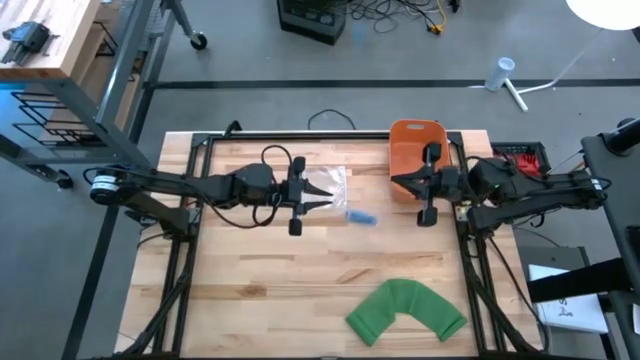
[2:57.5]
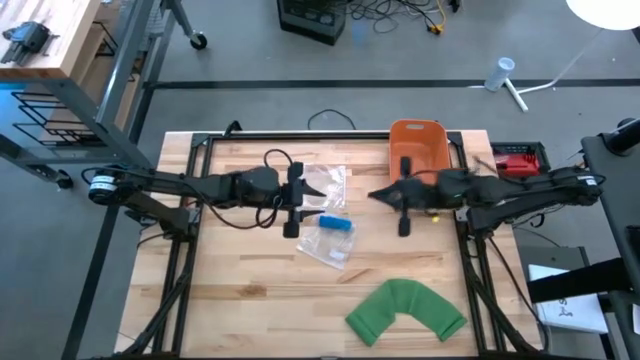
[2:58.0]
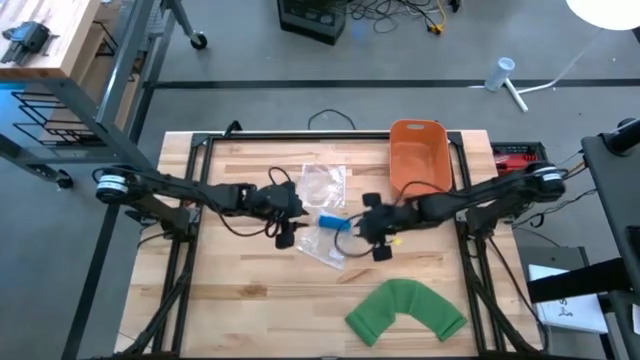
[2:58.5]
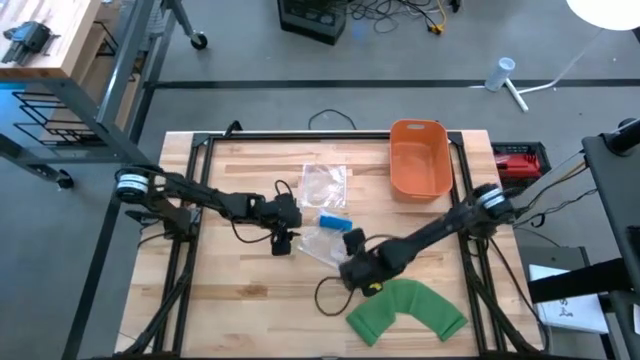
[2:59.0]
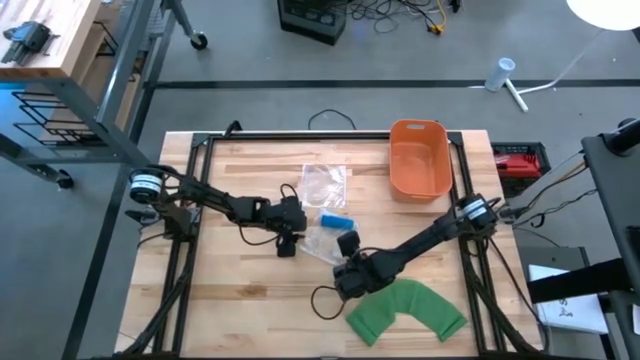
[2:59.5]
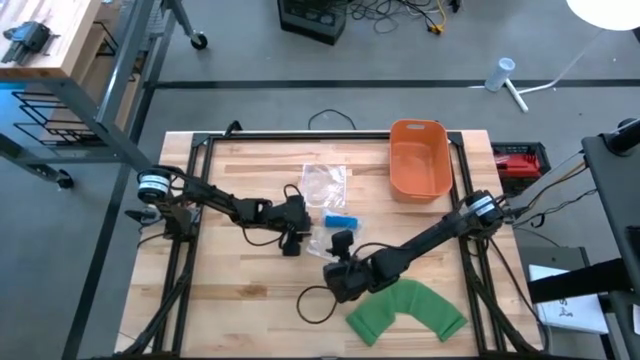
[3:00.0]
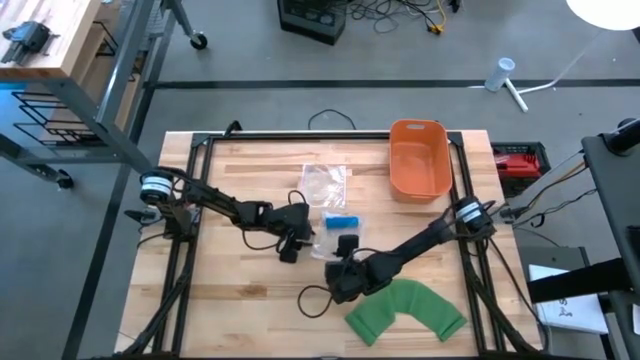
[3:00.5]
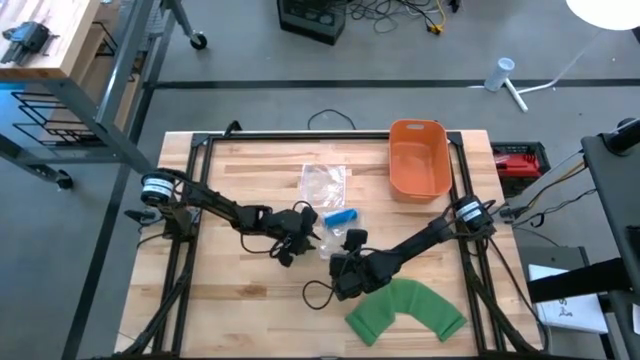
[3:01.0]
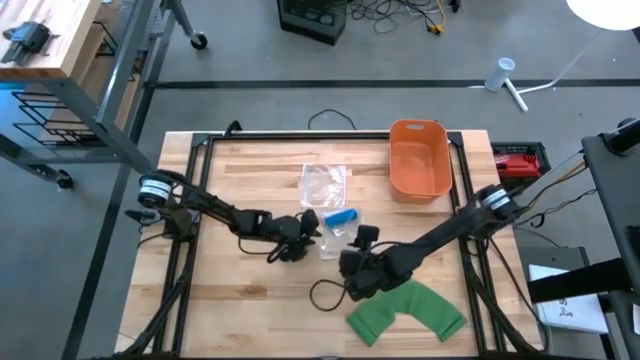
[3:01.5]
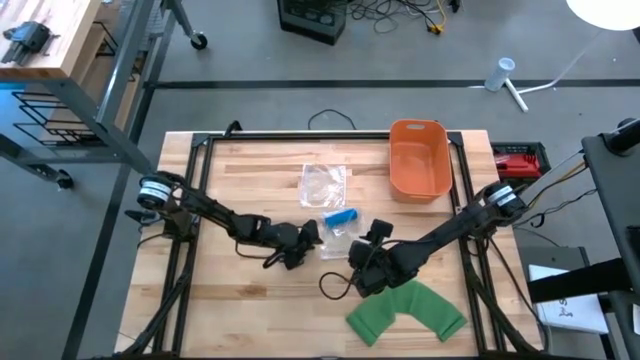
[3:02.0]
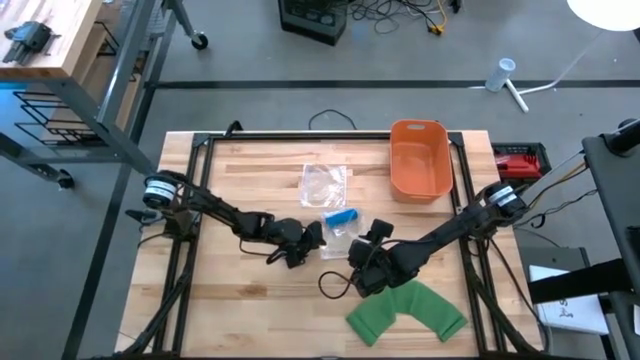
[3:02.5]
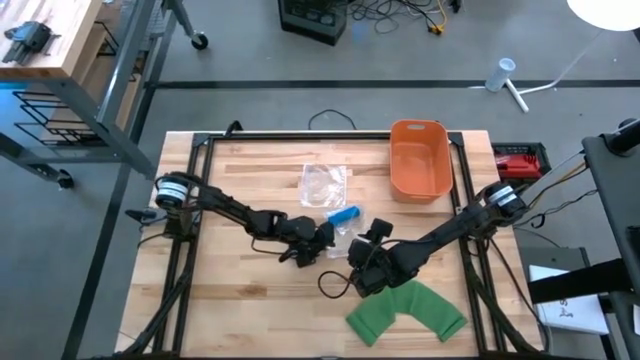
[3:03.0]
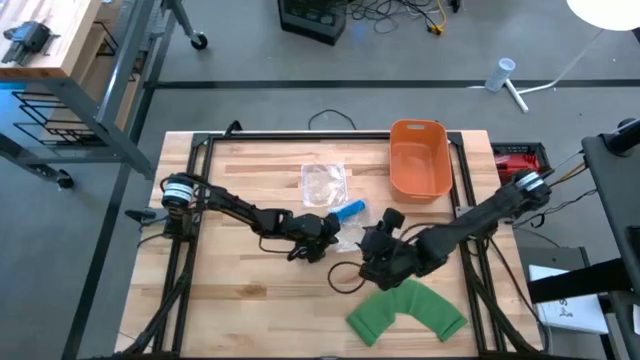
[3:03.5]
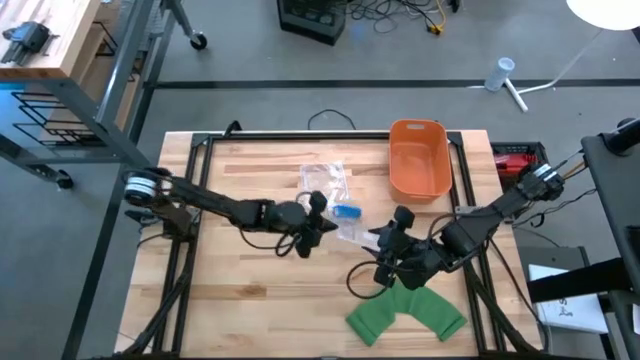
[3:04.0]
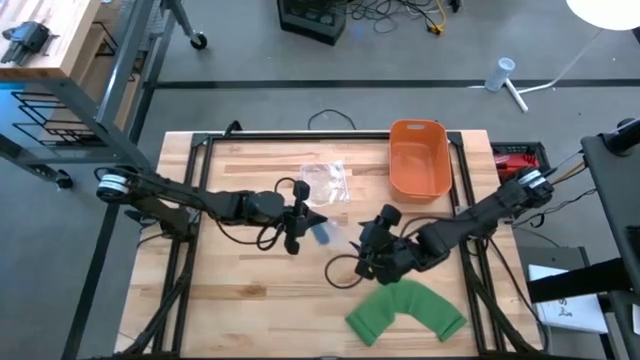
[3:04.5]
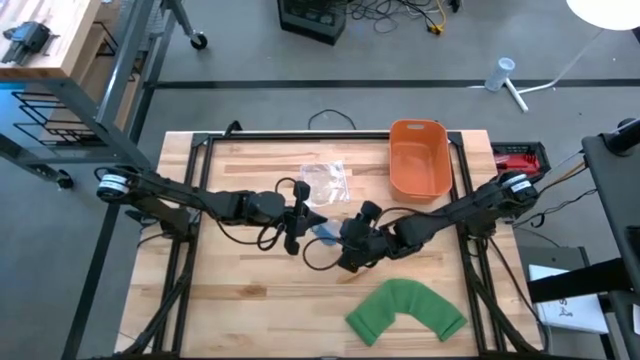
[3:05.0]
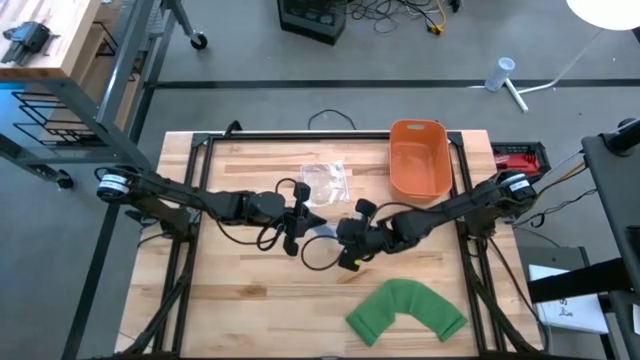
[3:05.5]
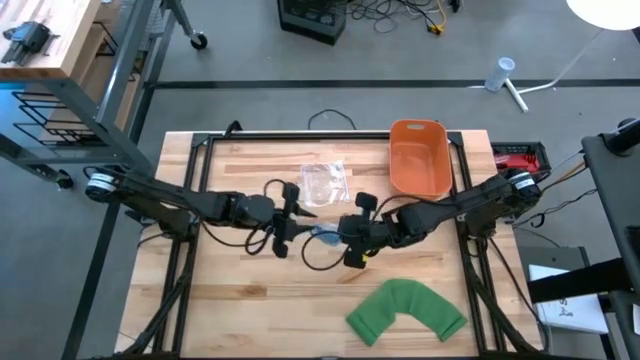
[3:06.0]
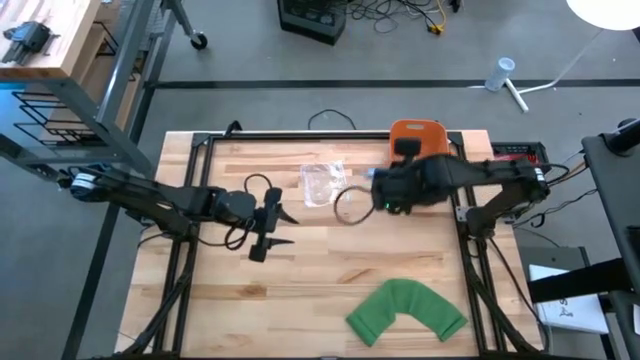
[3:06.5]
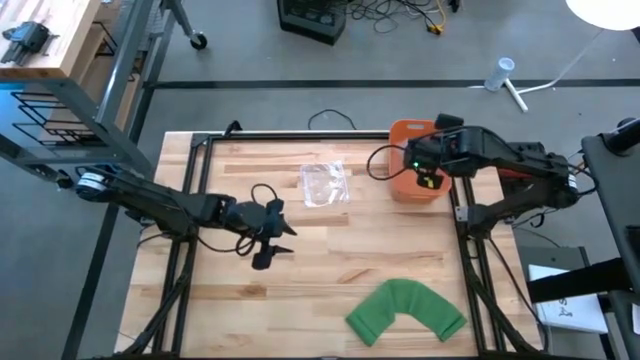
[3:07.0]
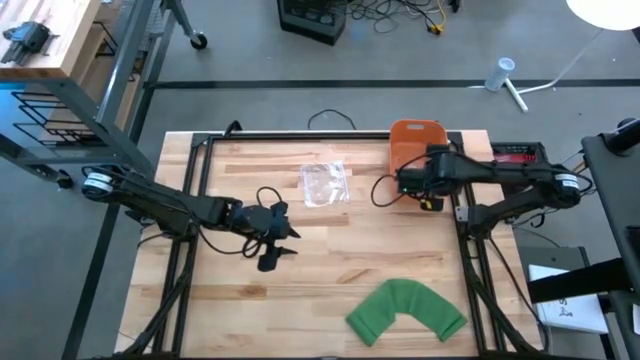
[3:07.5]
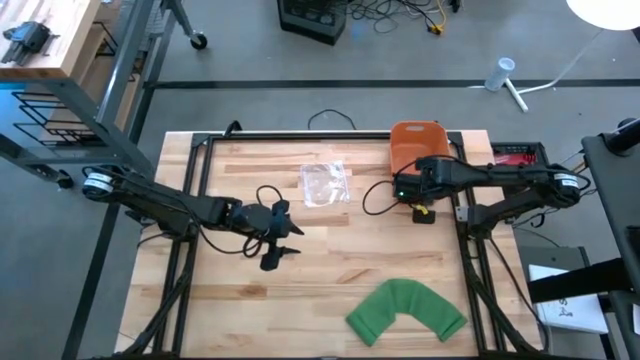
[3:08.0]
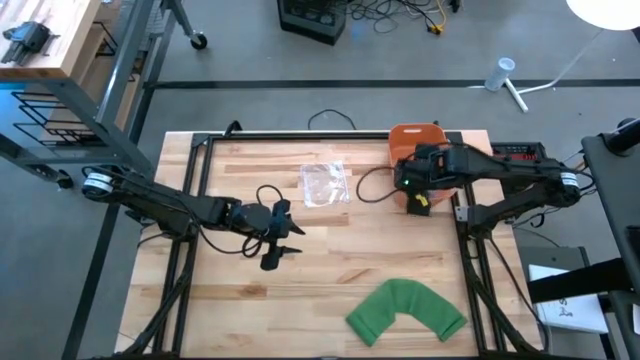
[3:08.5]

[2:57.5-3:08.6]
Task: Roll bandage
Put the transparent zip bag into the orange bin

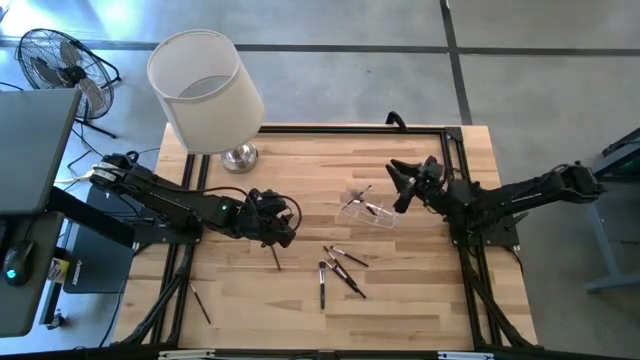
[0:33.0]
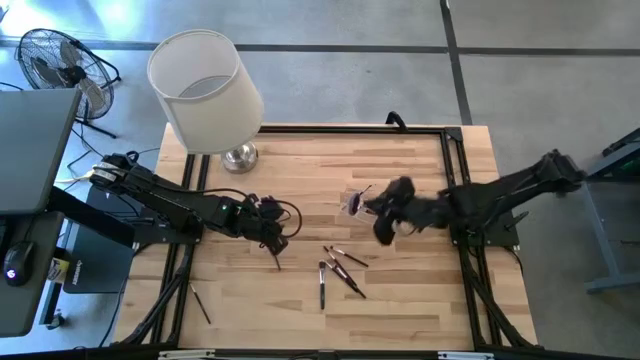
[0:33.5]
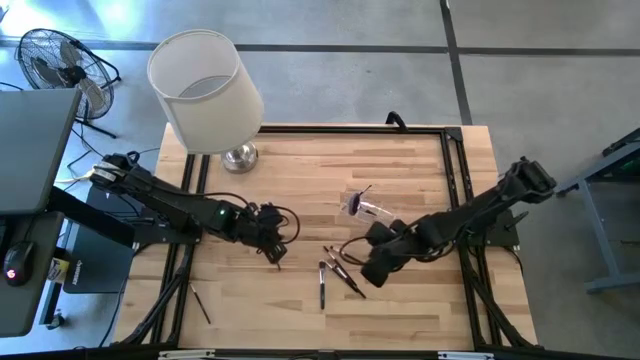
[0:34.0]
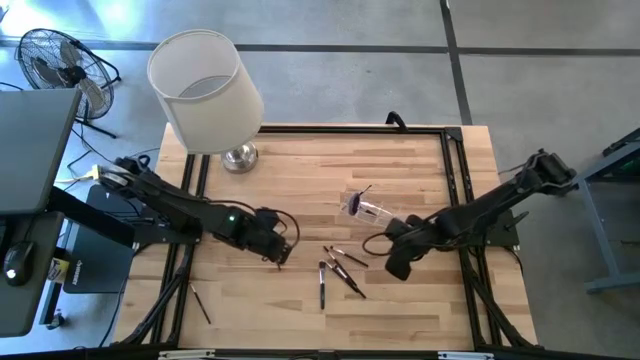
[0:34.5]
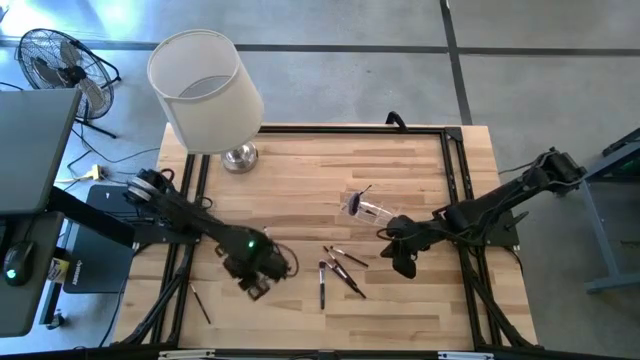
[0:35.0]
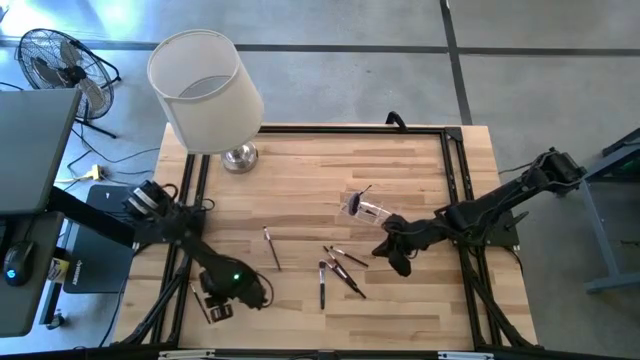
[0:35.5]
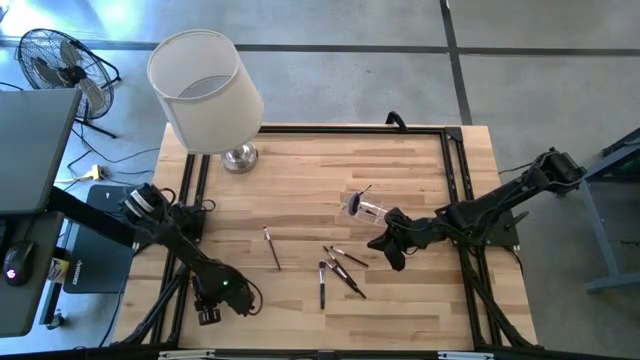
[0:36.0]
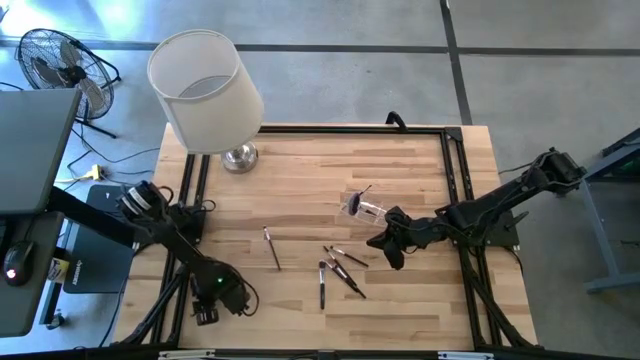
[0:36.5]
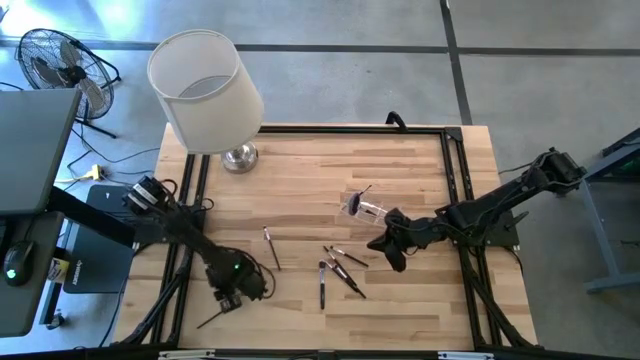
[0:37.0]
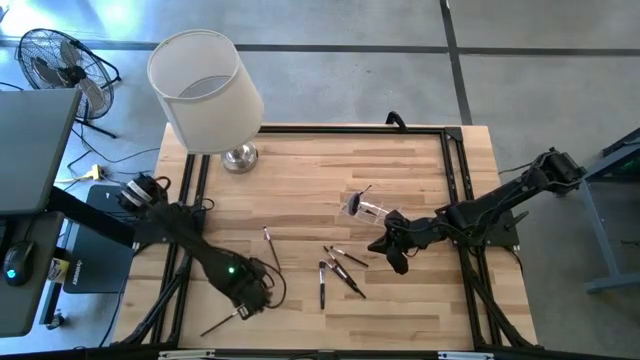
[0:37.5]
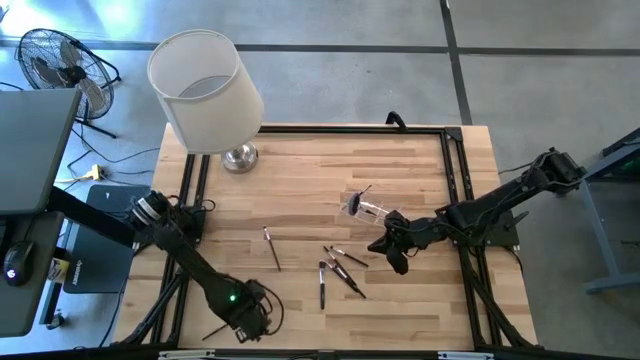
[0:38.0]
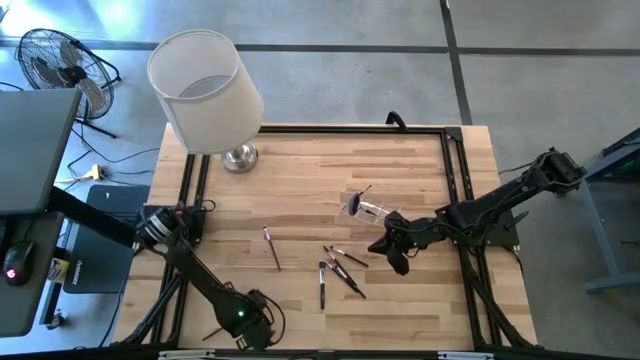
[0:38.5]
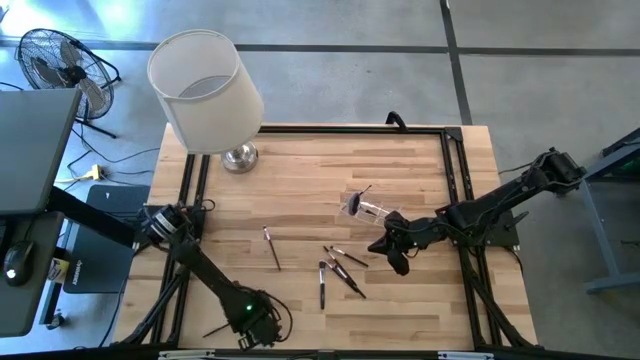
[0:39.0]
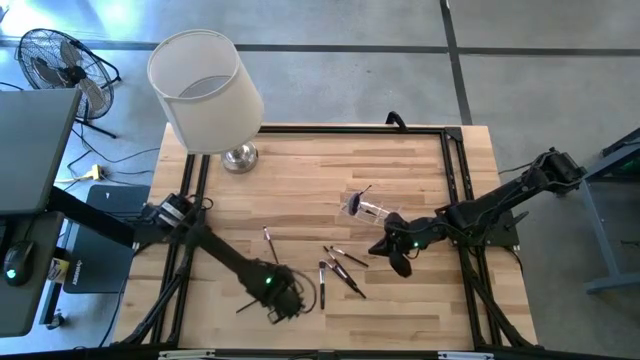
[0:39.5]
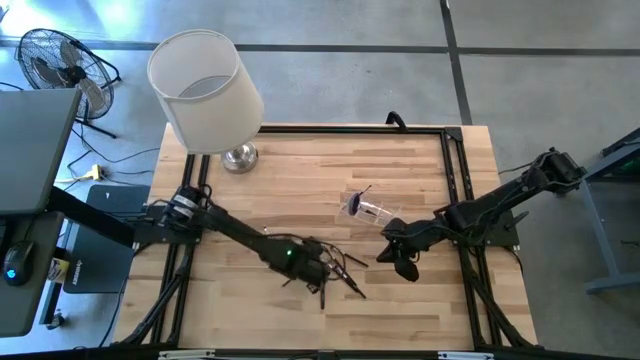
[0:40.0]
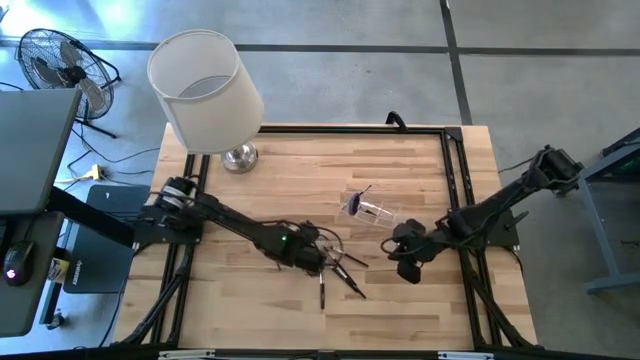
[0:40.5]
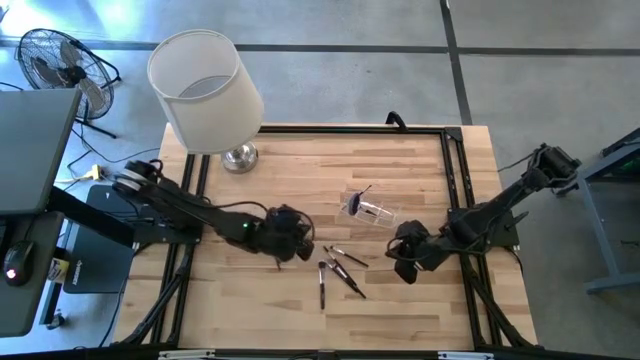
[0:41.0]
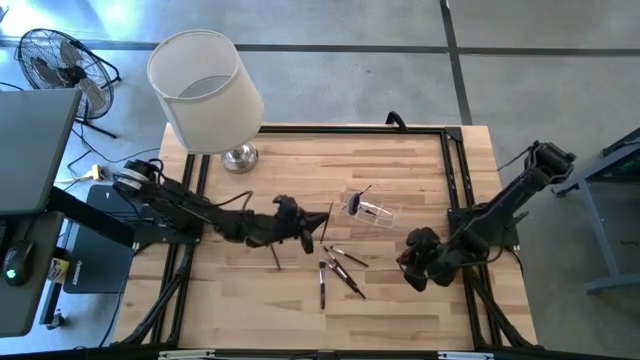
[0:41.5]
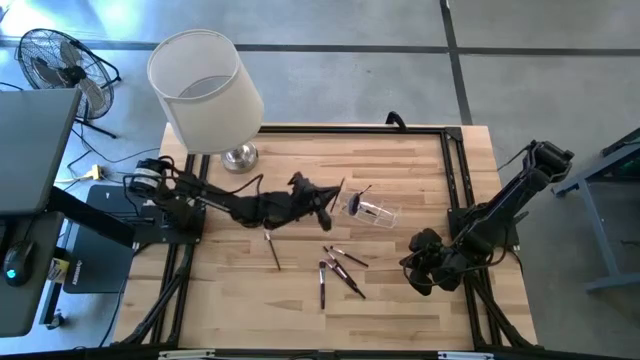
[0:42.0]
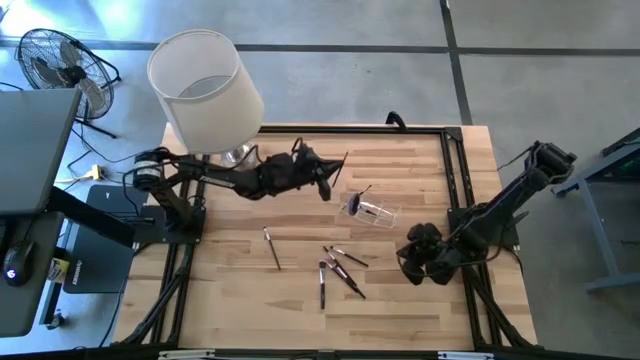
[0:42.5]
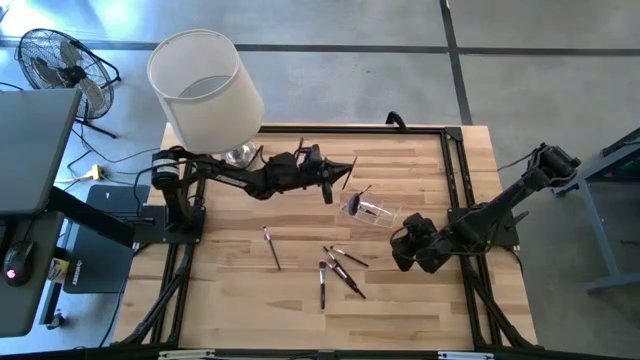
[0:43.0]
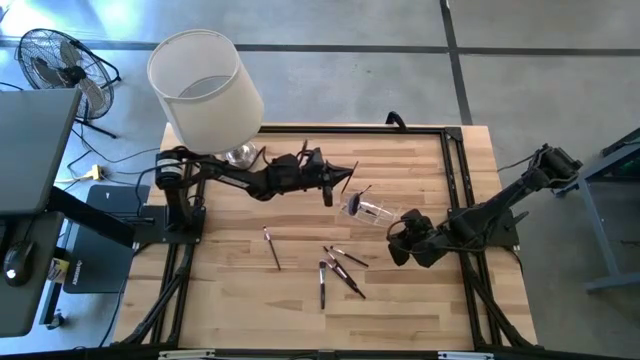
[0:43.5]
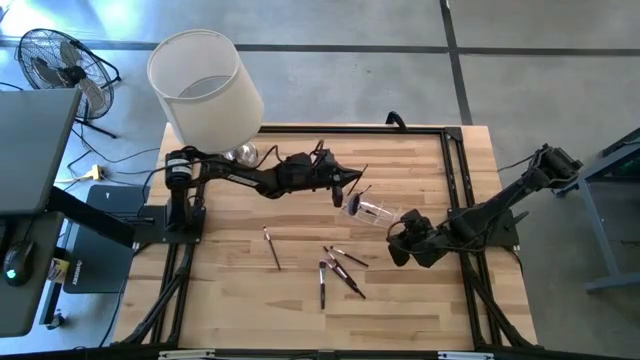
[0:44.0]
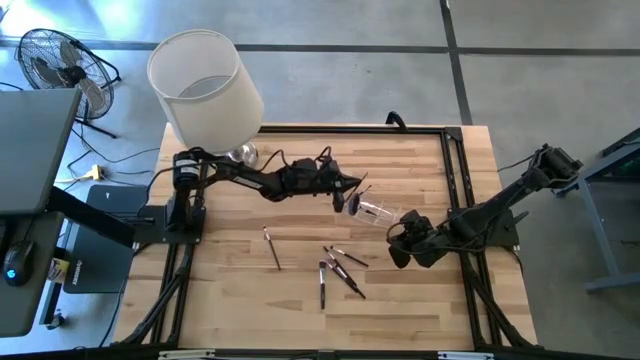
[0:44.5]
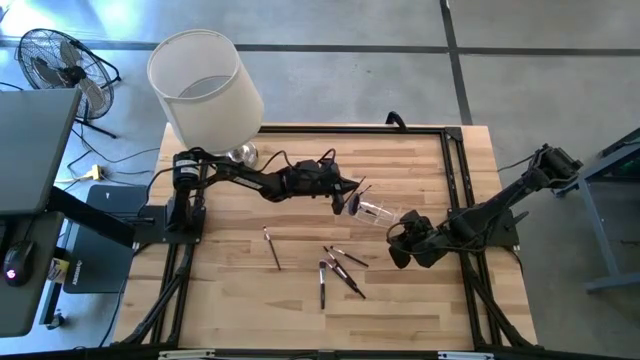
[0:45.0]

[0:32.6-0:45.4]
Task: Put items in baskets/containers
Put the black eyeshadow brush into the transparent organizer
